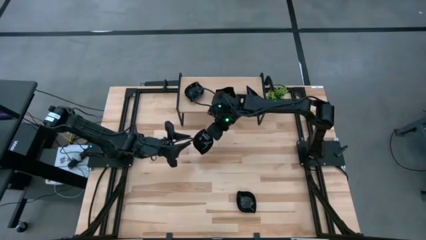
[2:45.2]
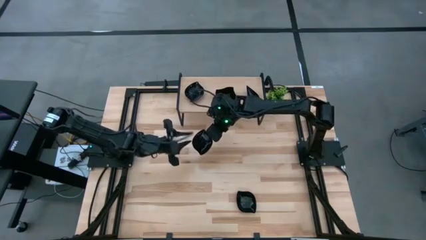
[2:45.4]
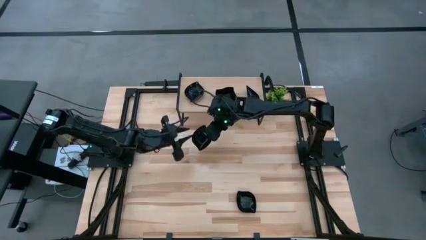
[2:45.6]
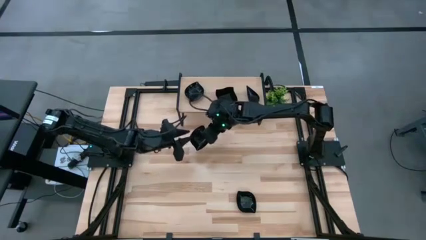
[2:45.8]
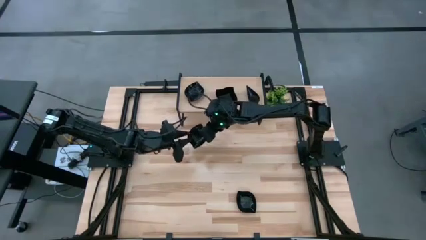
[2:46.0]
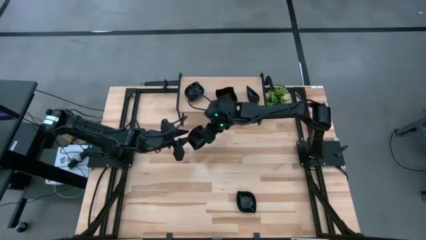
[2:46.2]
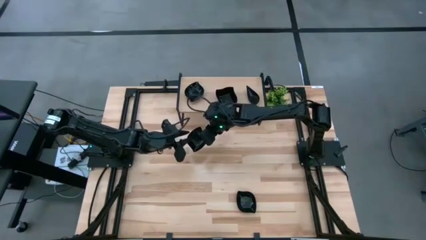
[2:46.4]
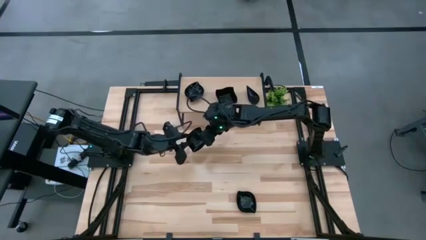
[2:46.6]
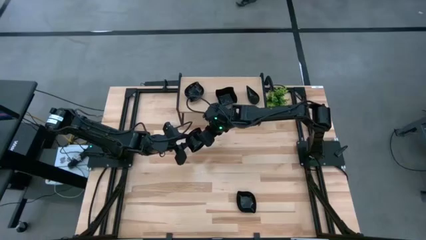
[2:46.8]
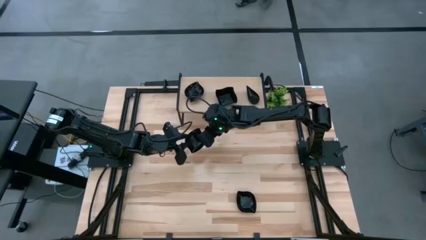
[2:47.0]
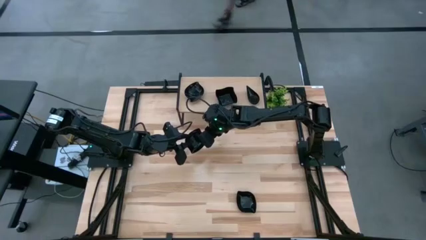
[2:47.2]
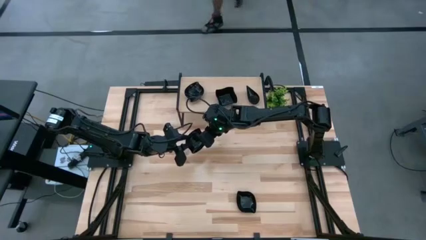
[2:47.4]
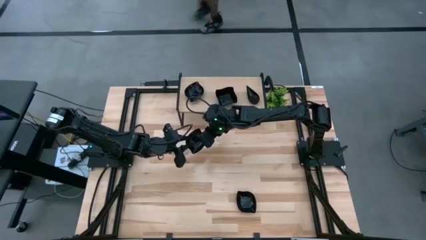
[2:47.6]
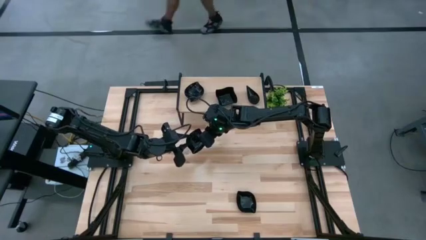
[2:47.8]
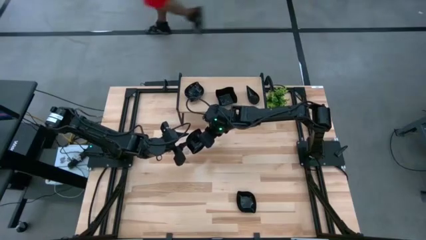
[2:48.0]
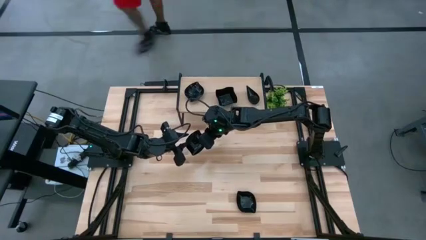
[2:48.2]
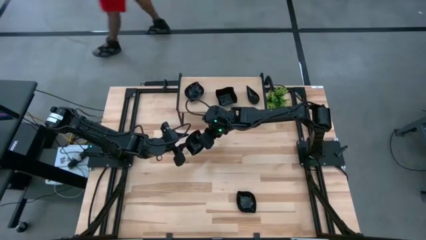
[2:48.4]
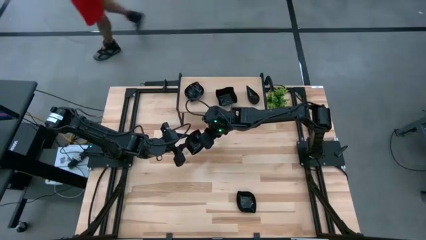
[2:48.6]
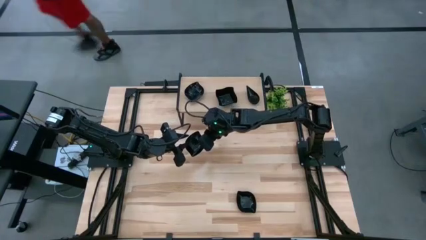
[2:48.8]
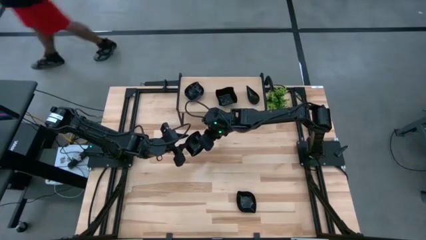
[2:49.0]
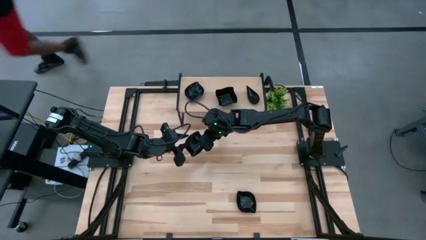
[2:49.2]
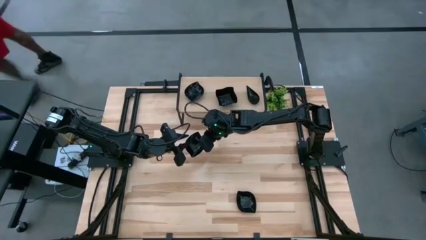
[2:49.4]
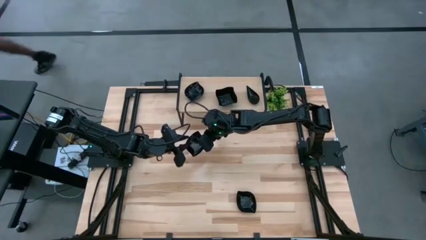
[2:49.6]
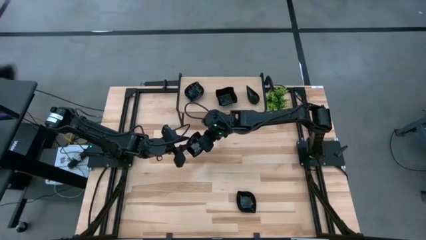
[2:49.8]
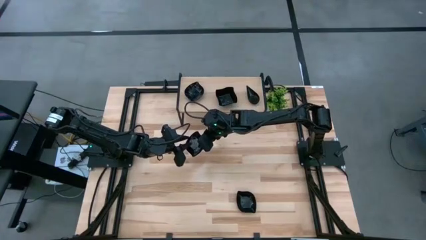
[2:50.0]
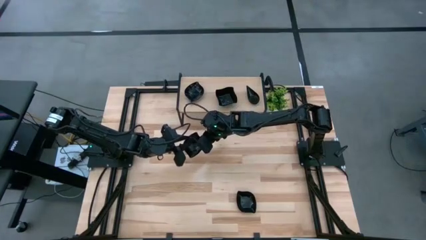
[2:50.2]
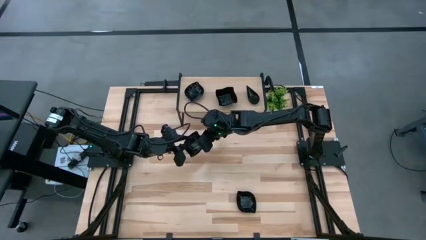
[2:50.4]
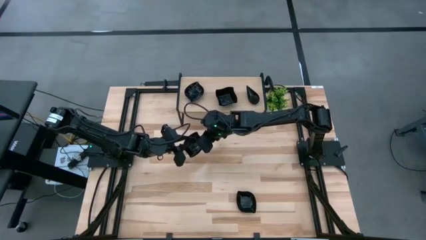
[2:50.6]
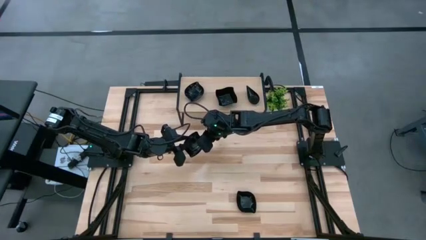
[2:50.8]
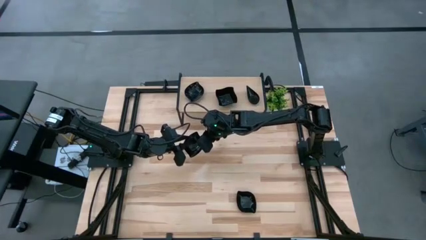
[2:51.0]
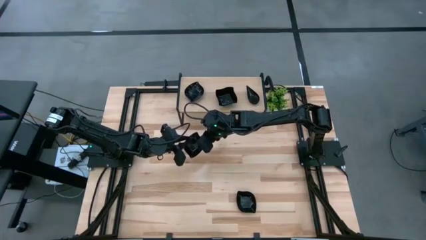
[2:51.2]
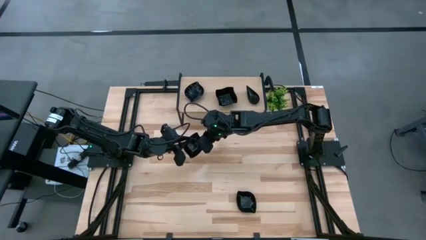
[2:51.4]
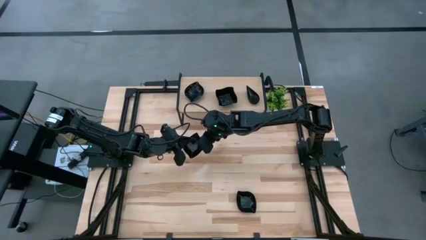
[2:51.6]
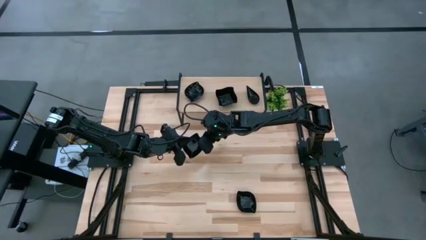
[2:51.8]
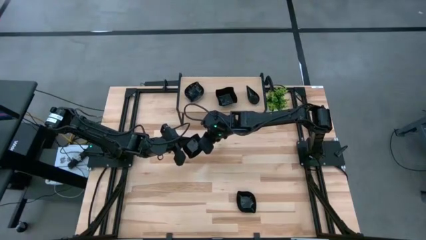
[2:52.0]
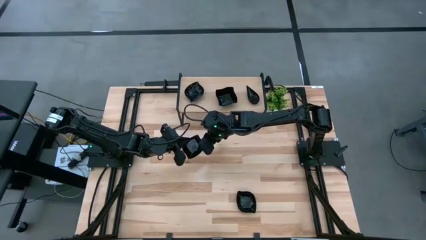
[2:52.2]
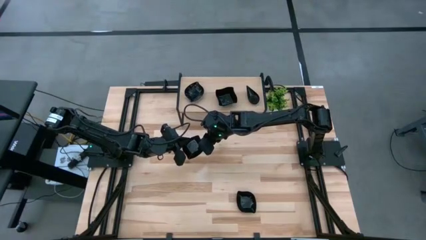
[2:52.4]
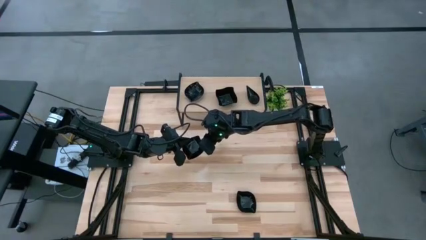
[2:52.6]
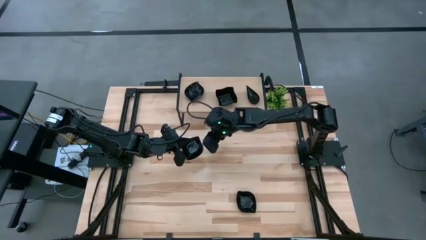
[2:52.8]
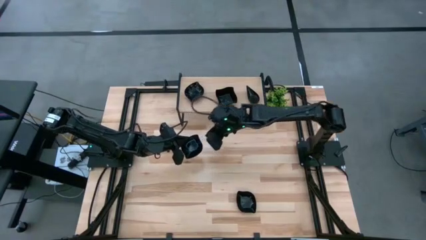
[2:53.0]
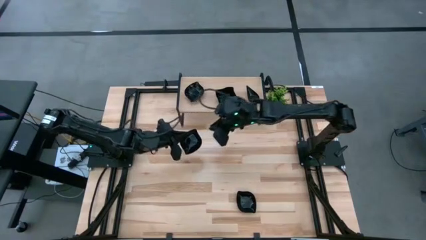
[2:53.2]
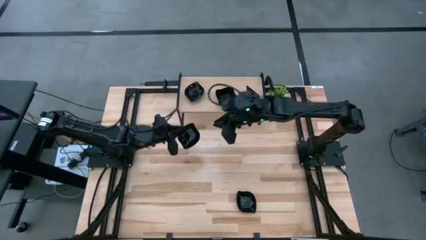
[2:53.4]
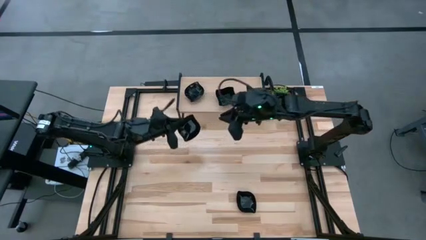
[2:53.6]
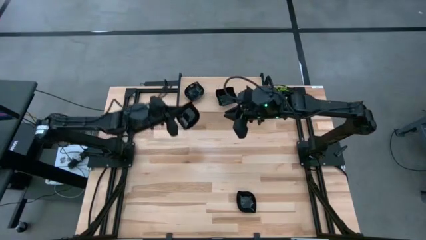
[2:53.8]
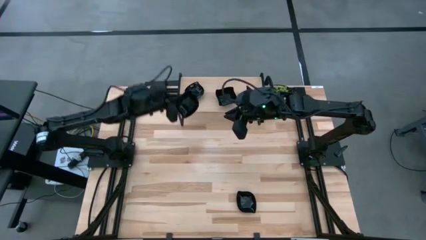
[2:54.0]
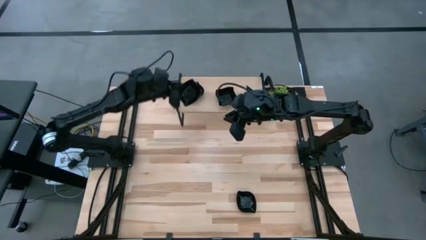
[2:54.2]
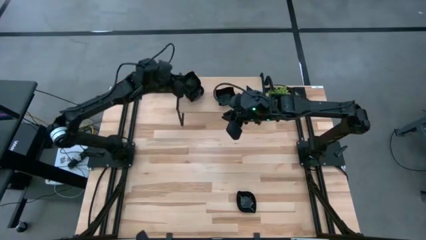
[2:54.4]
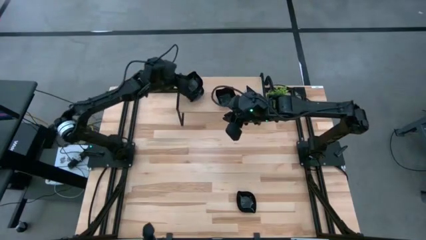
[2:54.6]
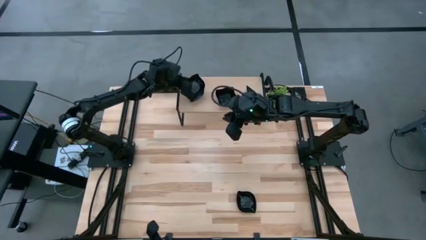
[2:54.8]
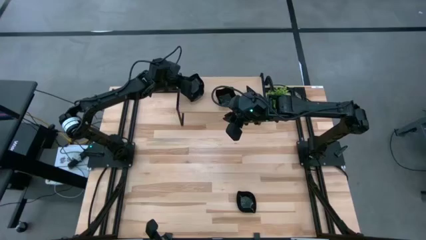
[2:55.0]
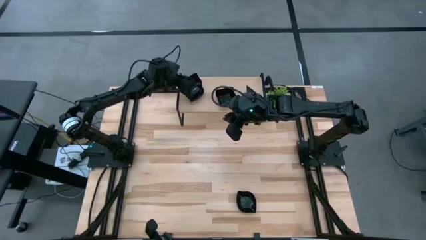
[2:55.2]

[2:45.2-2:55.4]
Task: Pick & Place Mini shaped plates
Stack the black leaf shaped plate on top of the black leaf shaped plate on the shelf
